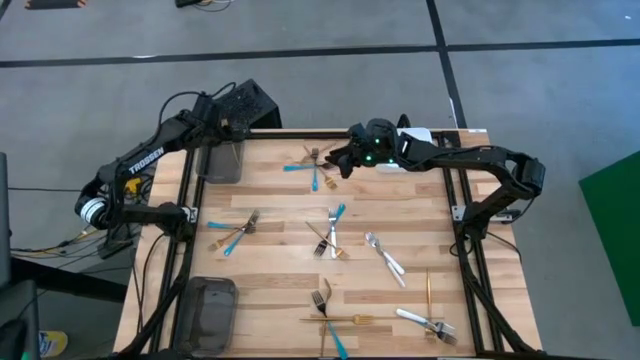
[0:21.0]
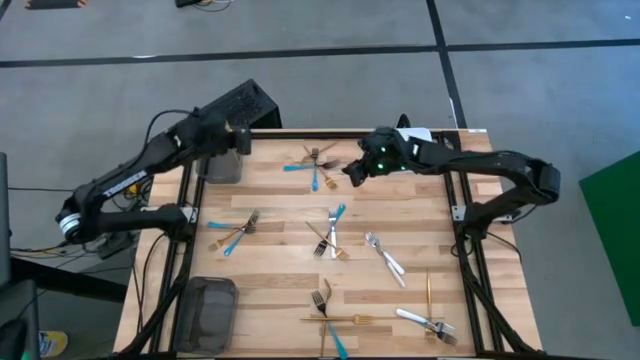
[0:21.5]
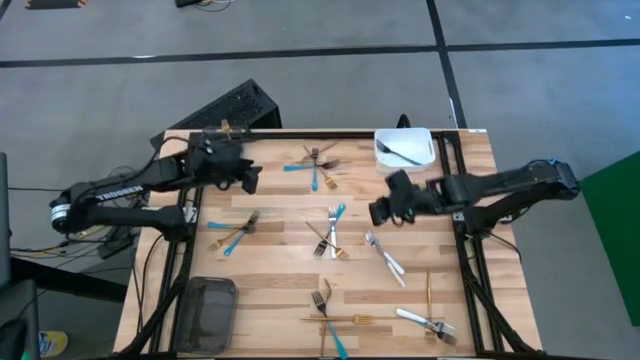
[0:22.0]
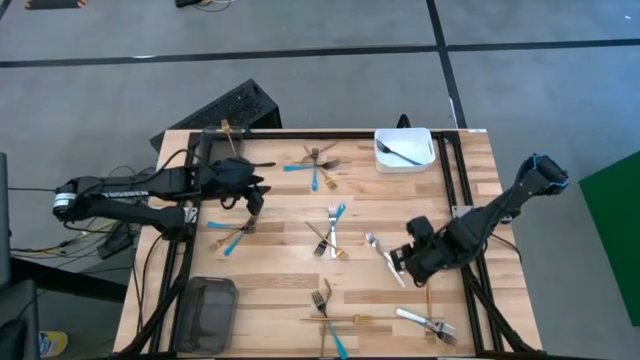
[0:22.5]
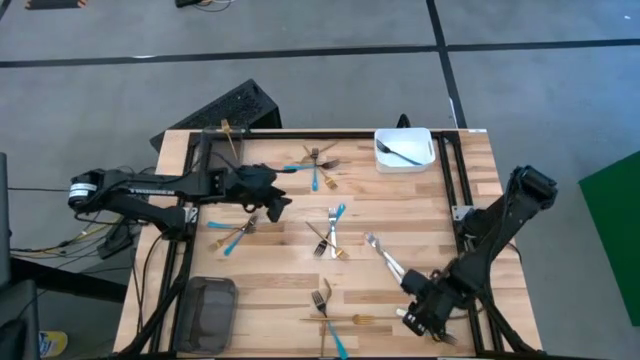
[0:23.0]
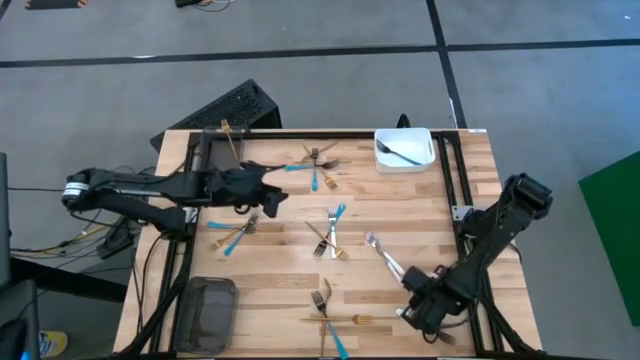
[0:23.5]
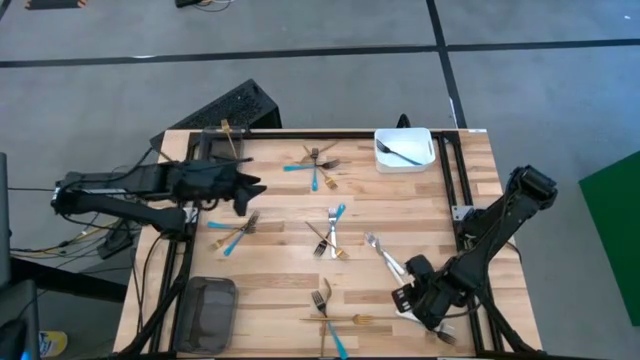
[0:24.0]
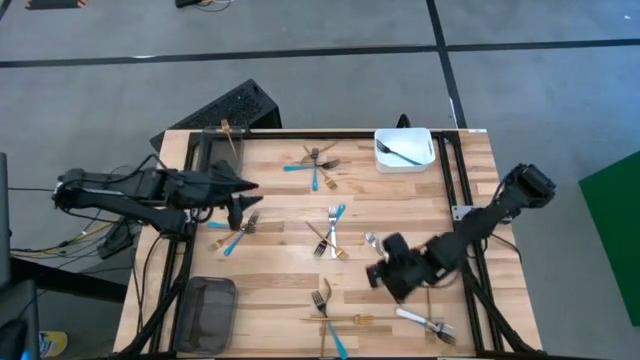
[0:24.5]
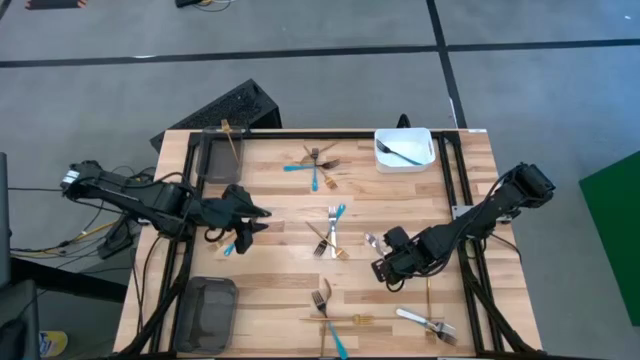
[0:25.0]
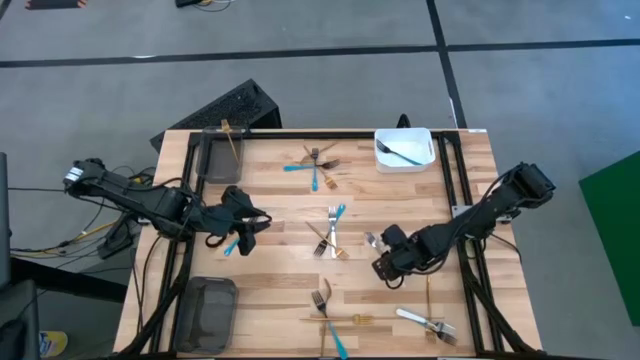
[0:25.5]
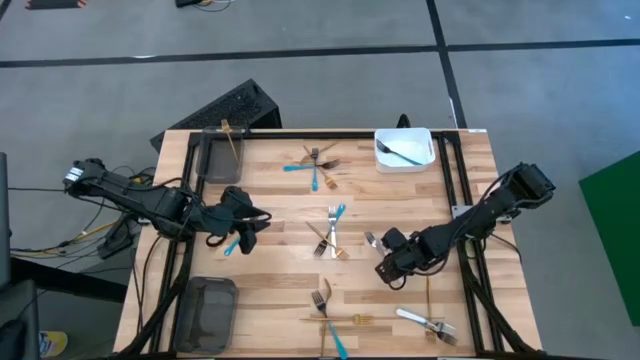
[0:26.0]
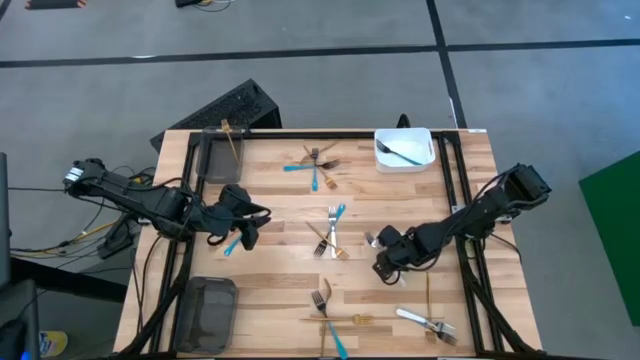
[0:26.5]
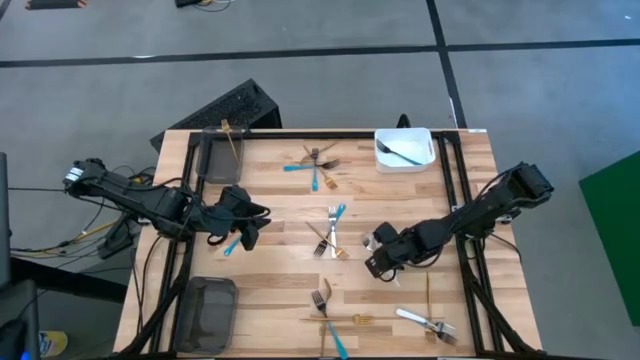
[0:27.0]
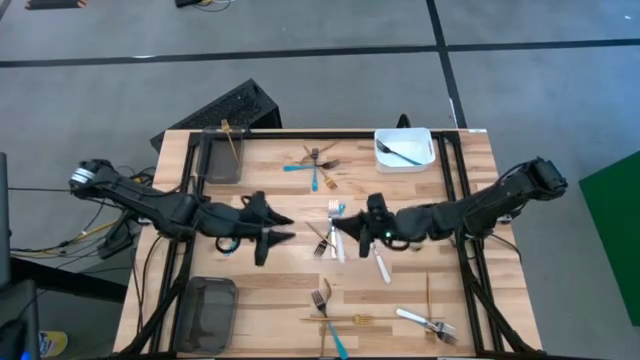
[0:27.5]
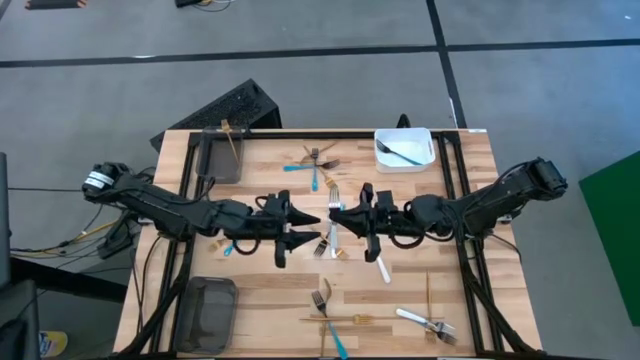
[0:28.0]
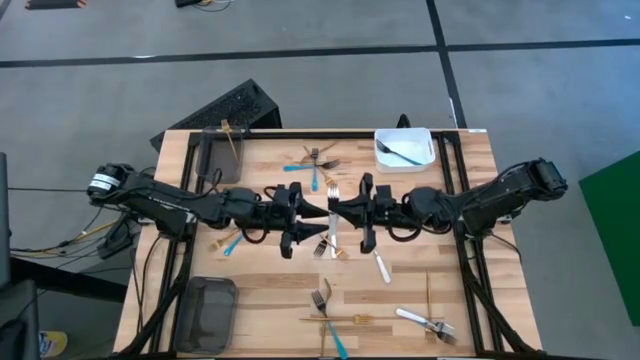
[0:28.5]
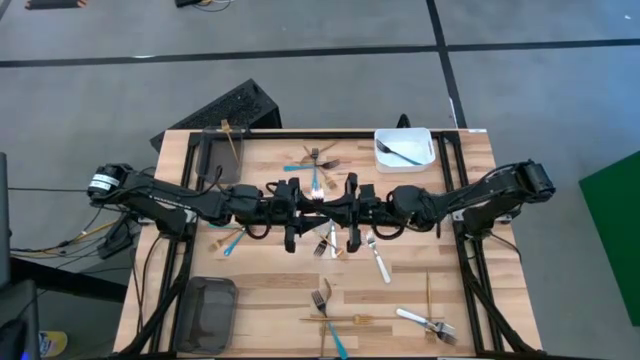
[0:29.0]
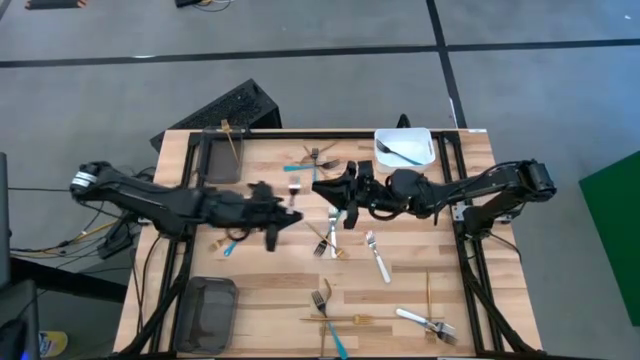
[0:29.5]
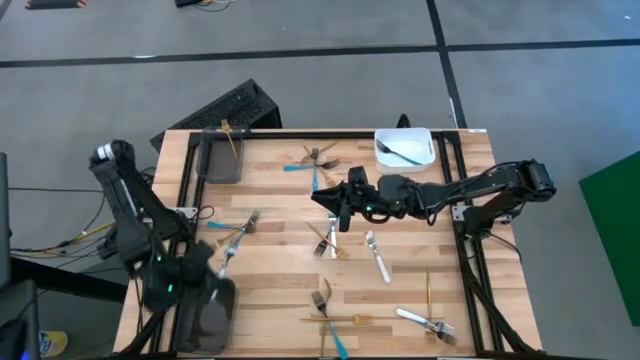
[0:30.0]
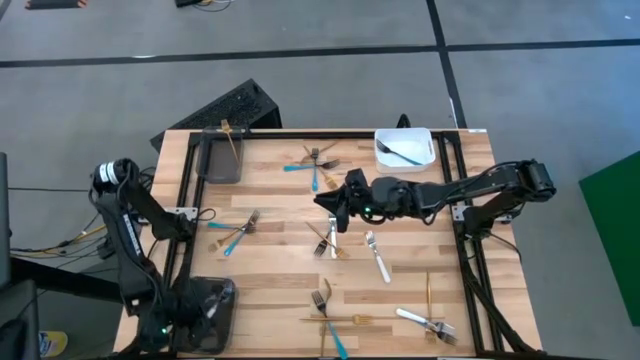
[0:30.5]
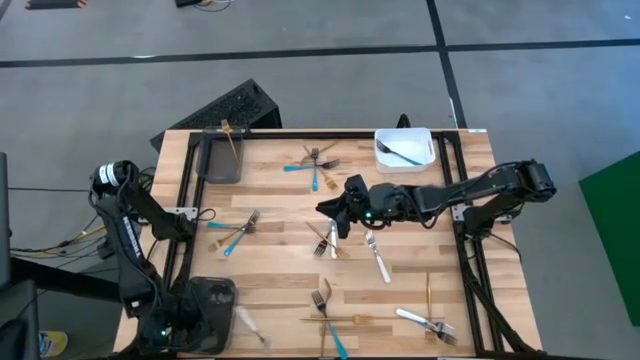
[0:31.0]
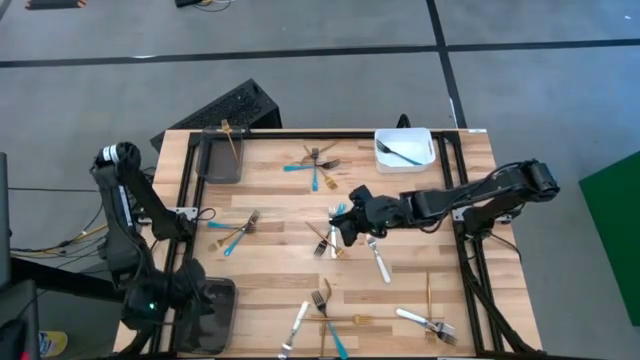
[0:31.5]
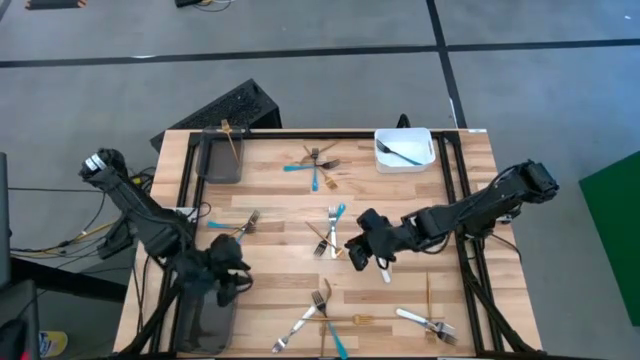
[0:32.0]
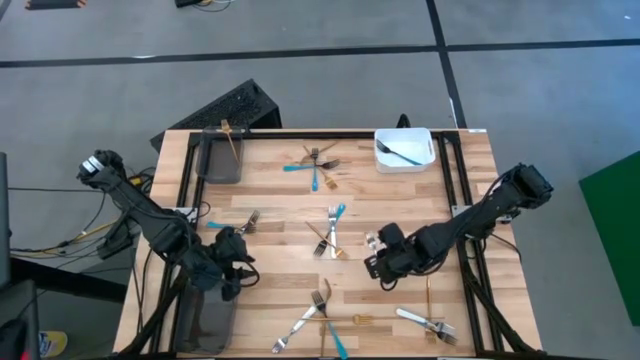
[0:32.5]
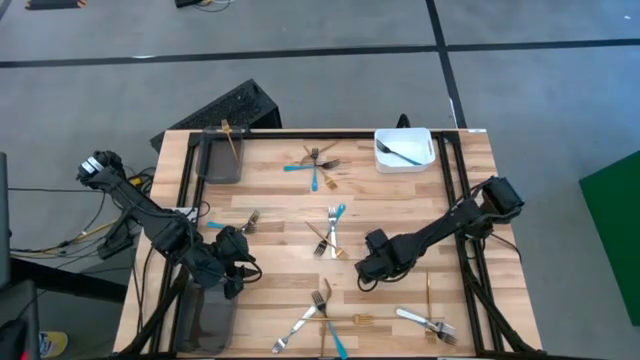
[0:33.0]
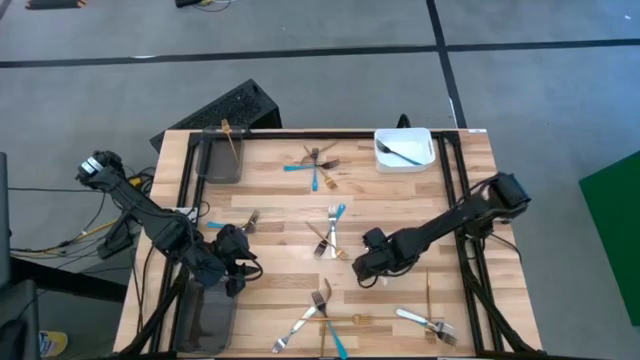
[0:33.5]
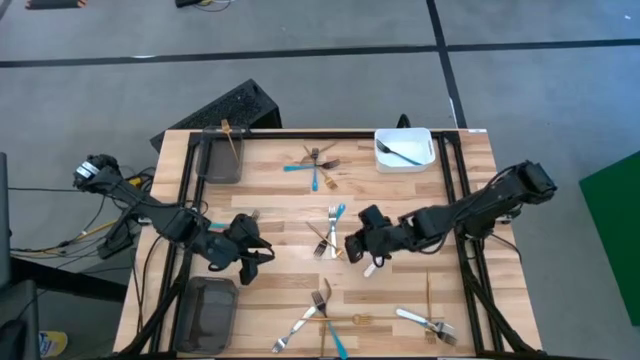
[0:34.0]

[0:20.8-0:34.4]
Task: Sort silverware by color (type)
Put the white fork into the bottom black bin

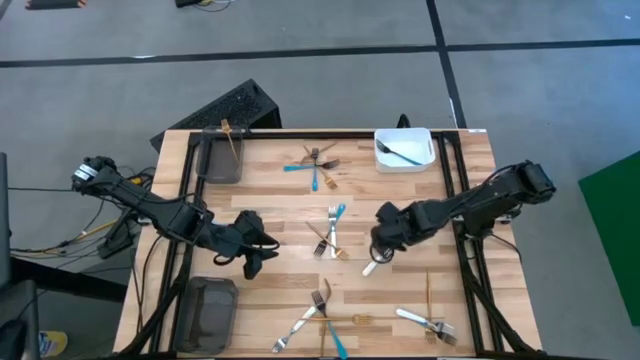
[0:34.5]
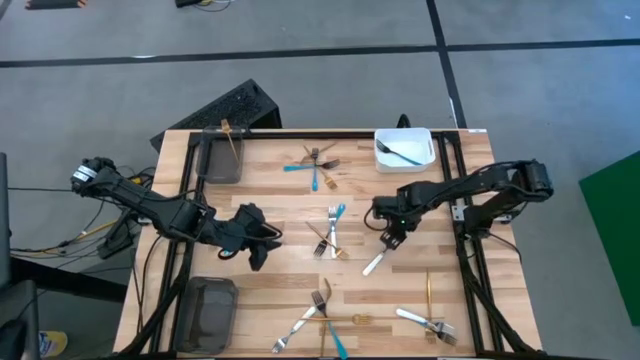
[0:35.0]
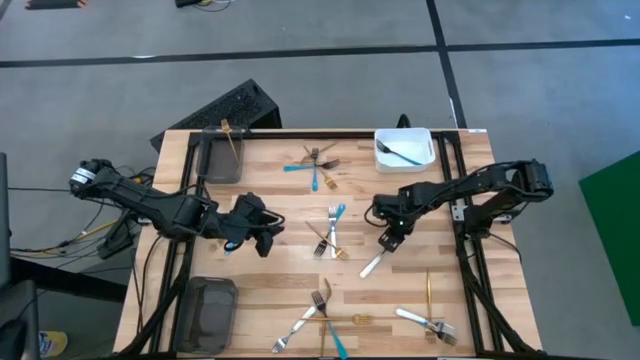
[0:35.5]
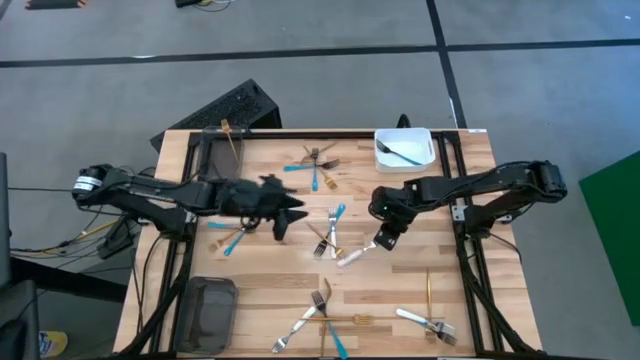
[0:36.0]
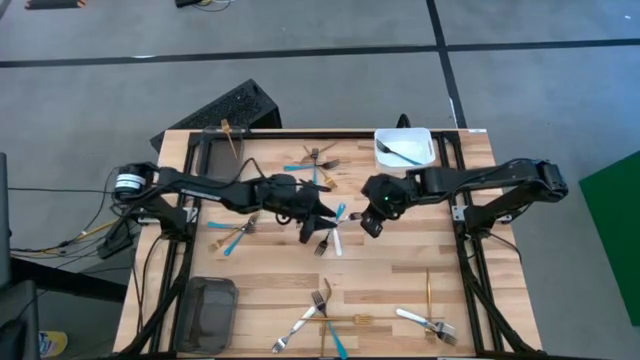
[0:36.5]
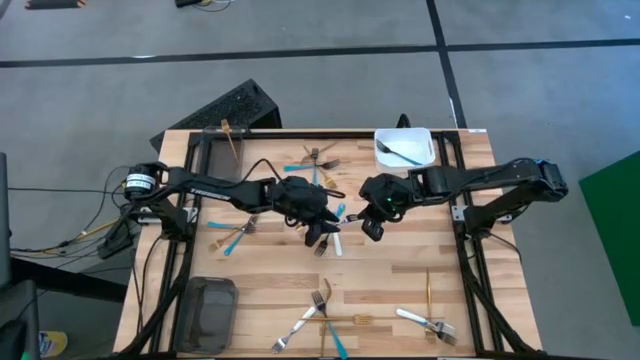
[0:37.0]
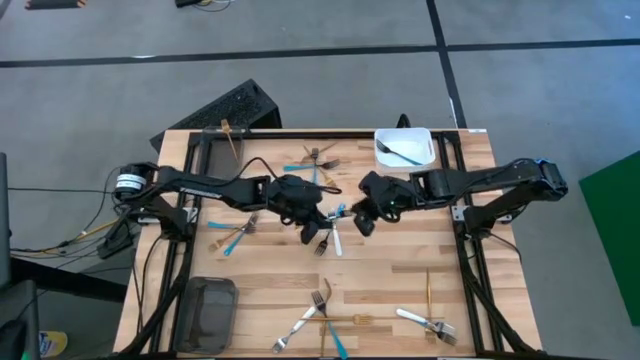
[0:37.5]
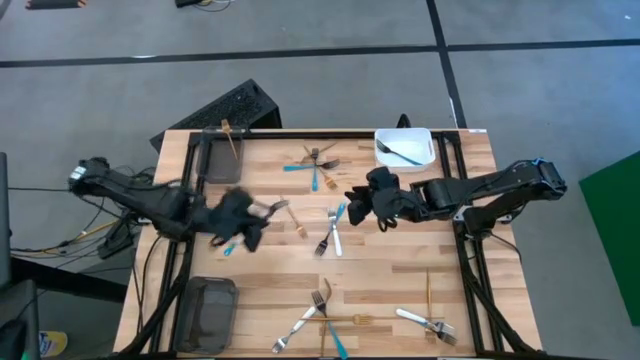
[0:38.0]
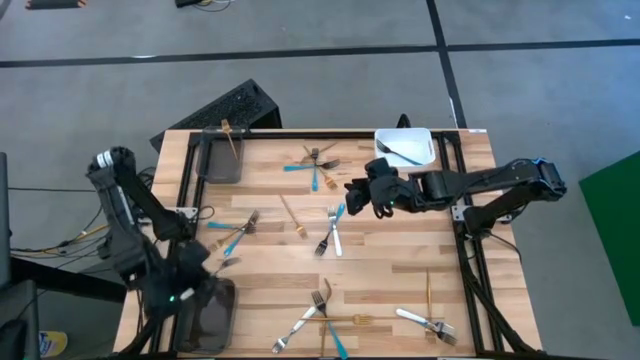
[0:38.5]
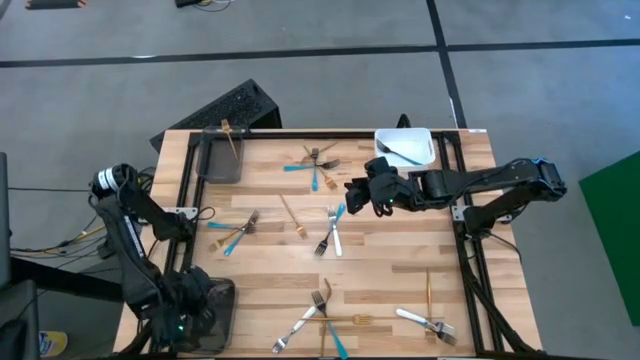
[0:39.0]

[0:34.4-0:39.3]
Put the white fork into the bottom black bin

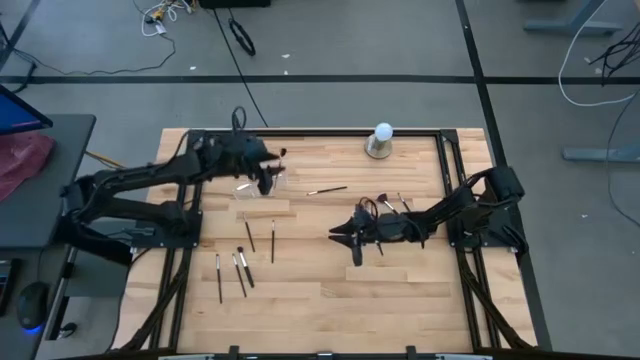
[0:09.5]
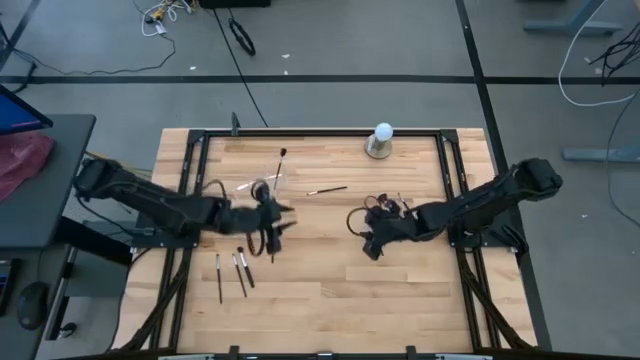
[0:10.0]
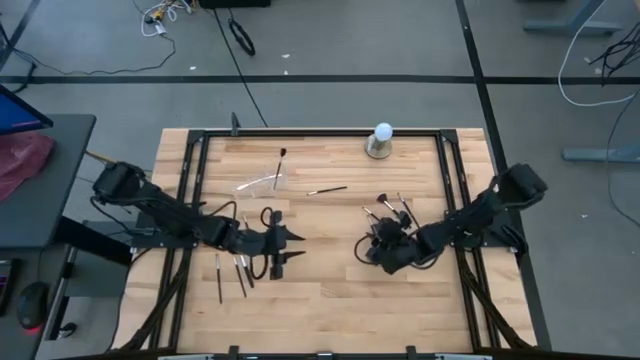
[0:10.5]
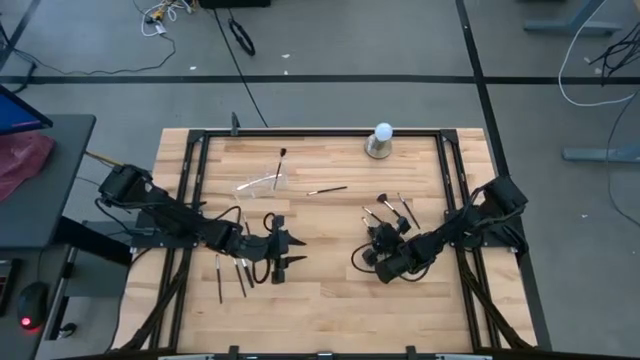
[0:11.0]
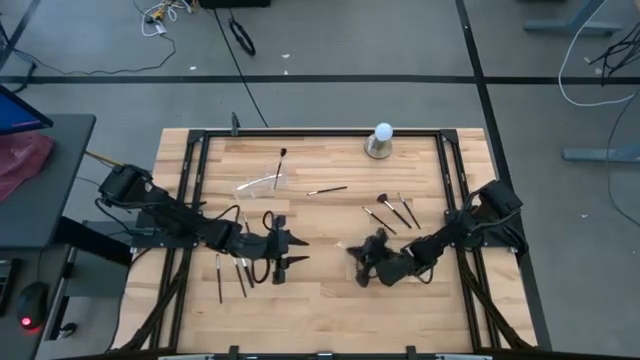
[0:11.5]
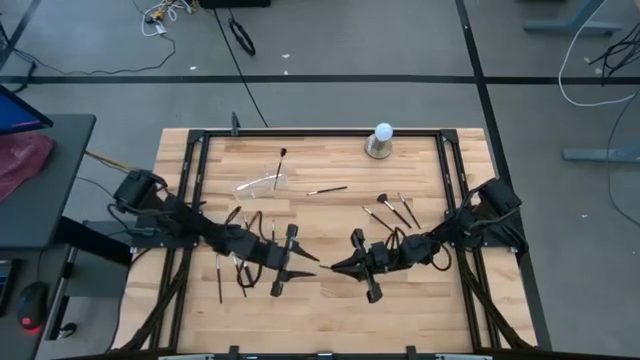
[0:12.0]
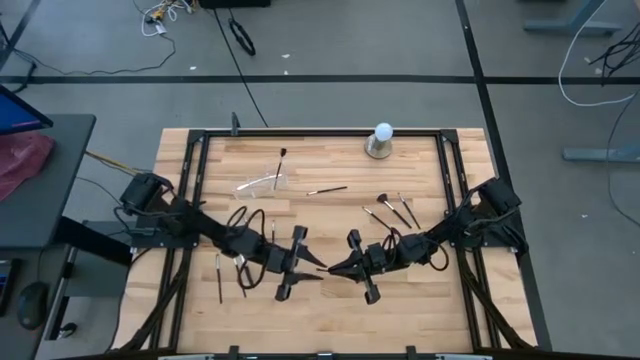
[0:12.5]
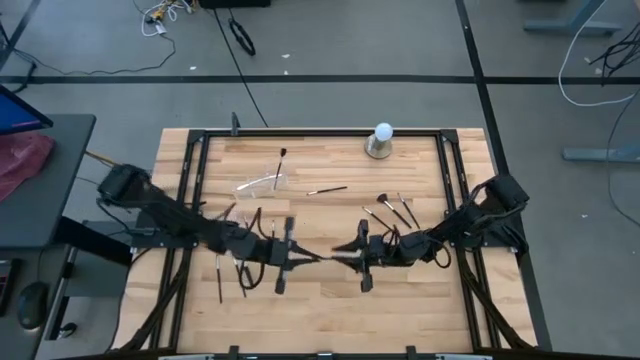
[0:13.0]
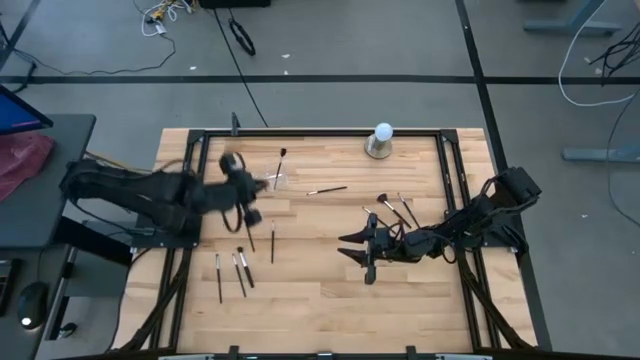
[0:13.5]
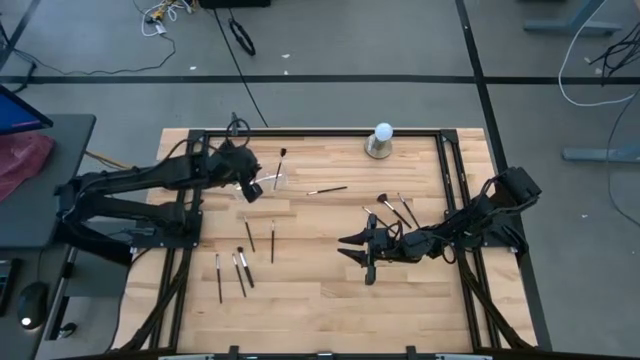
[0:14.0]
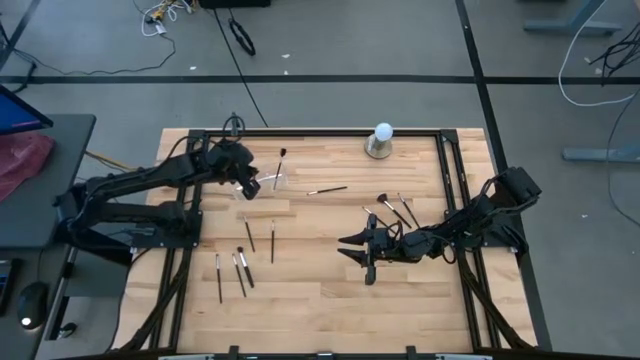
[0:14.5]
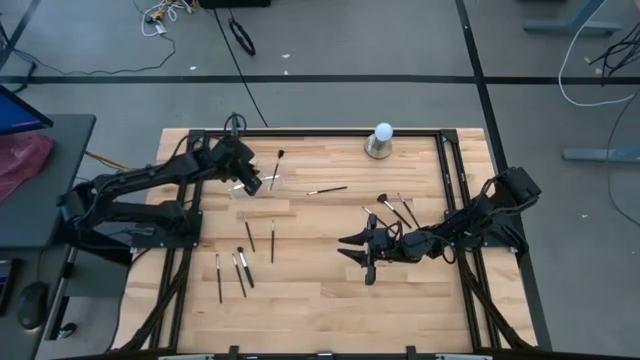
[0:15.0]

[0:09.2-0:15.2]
Task: Put items in baskets/containers
Put the black eyeshadow brush into the middle section of the transparent organizer
